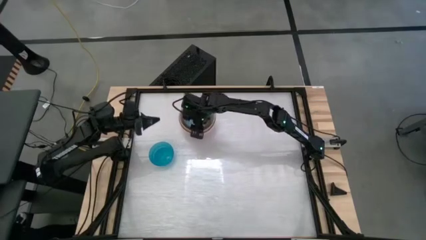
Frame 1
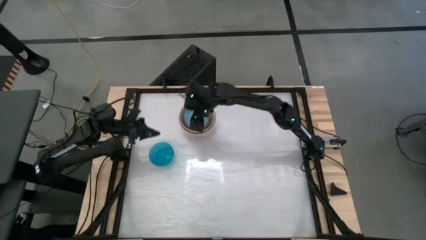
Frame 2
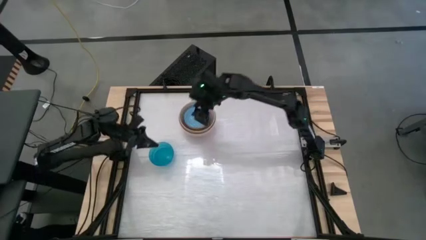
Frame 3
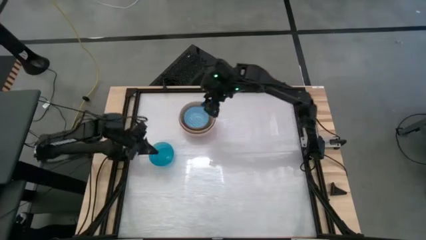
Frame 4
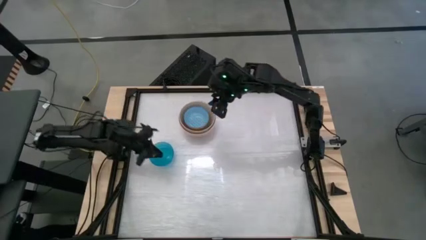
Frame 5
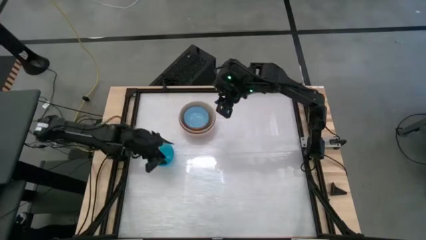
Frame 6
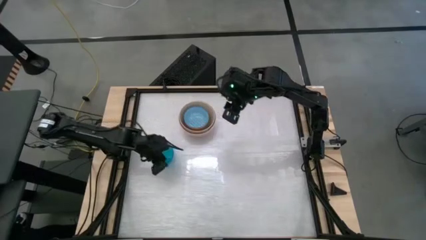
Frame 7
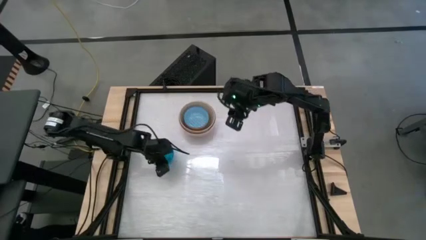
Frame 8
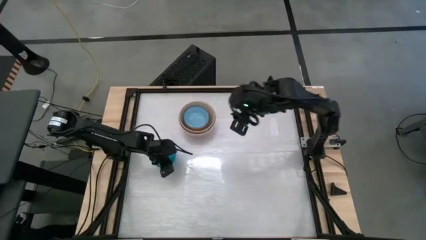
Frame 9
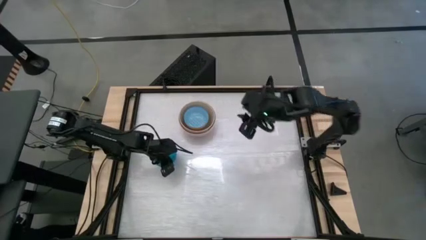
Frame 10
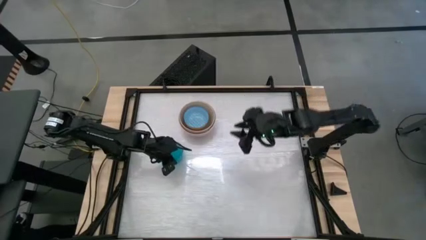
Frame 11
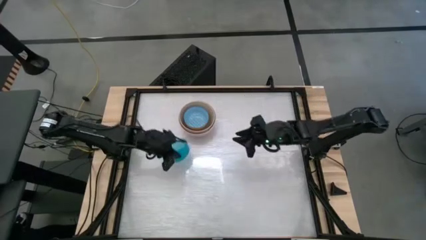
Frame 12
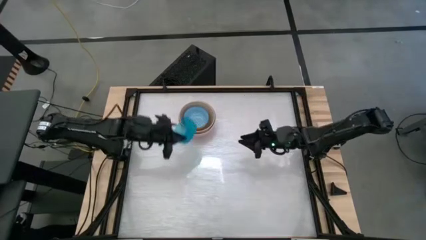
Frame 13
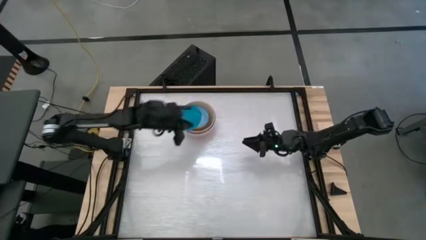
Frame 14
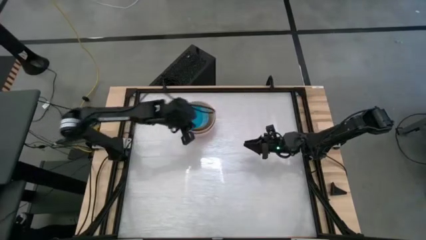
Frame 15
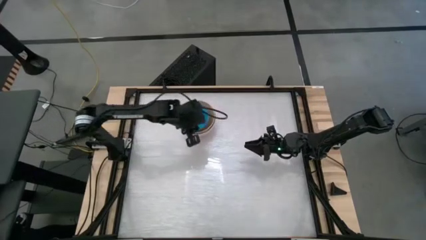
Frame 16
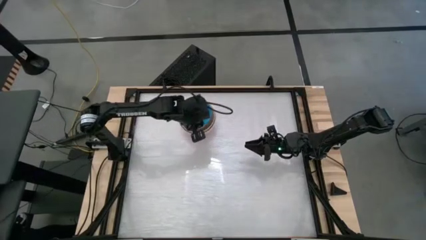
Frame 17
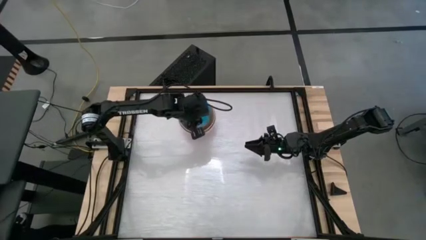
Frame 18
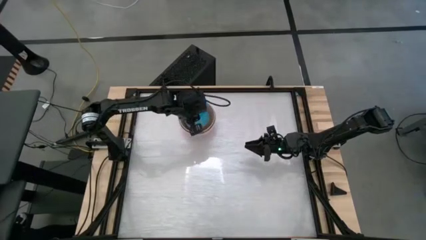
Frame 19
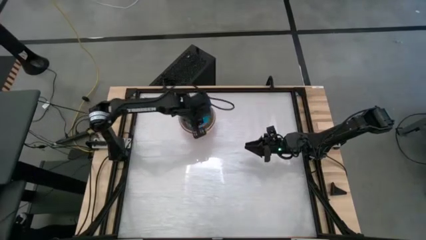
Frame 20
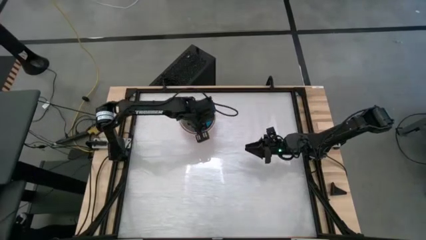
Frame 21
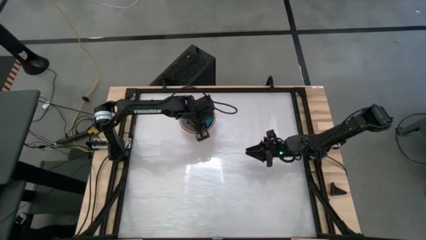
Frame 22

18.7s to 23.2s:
Stack the blue bowl on the orange bowl

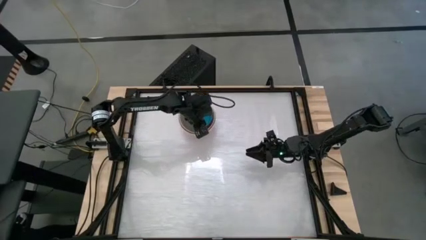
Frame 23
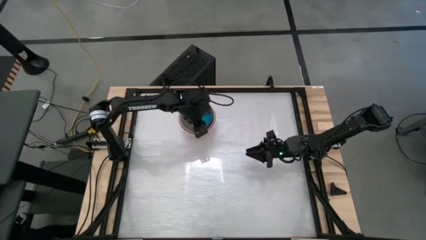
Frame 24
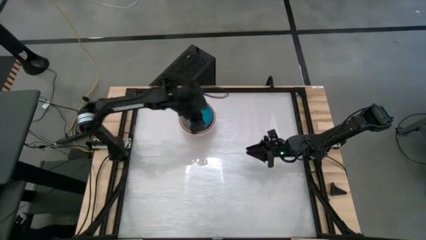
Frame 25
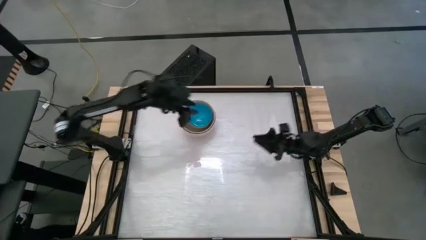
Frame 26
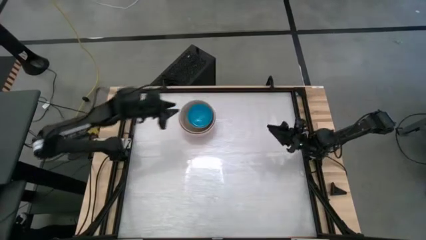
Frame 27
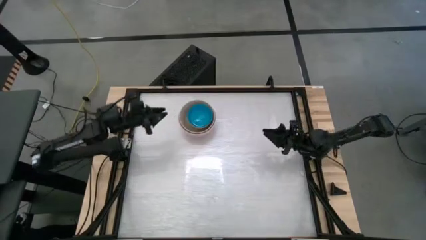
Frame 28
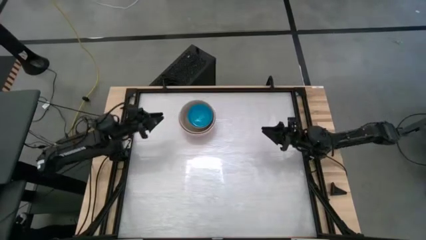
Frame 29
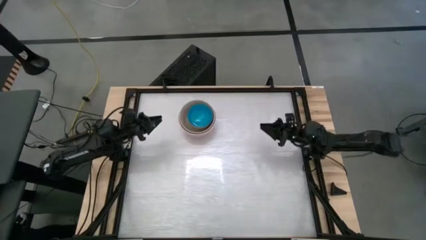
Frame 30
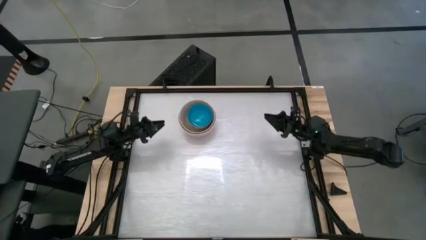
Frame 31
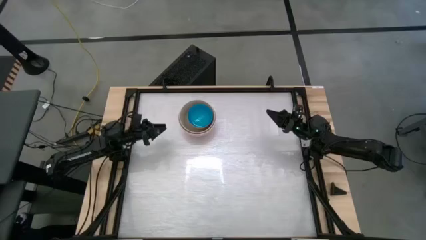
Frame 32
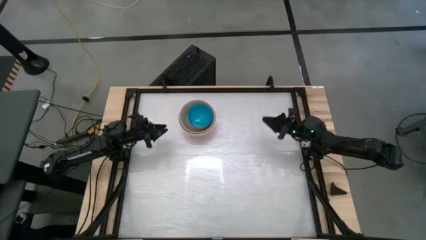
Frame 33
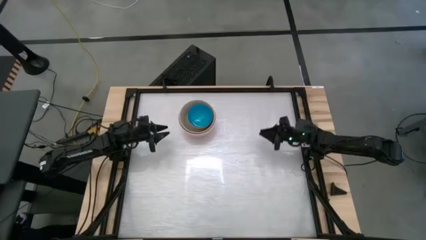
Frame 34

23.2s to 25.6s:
Return to Home Position

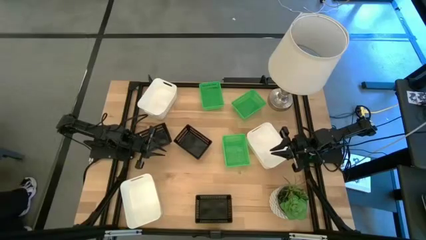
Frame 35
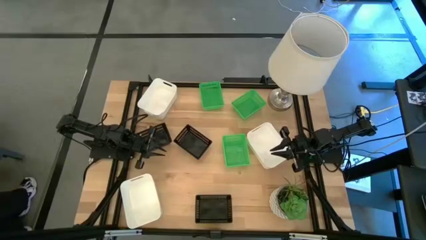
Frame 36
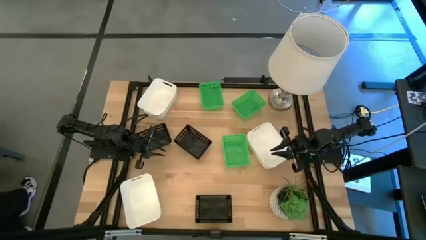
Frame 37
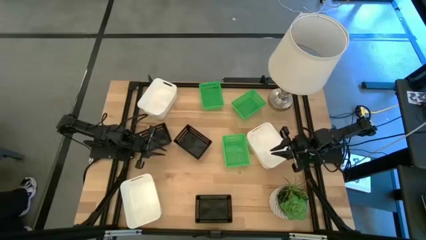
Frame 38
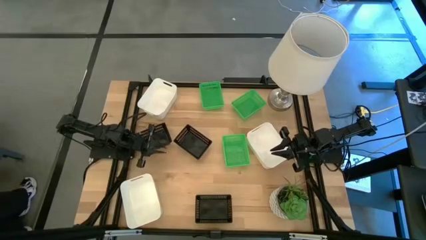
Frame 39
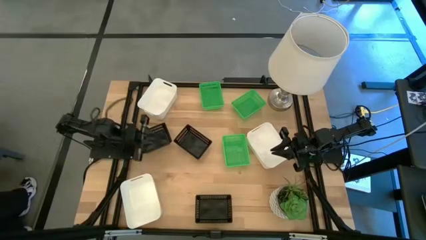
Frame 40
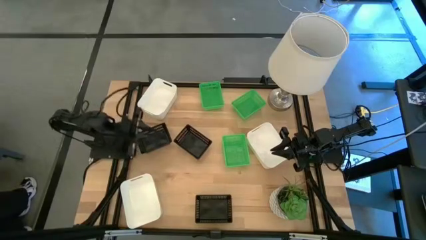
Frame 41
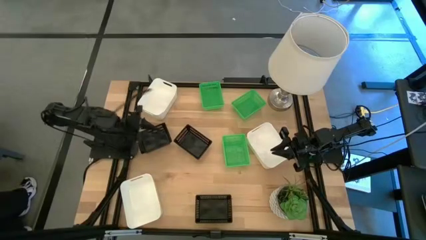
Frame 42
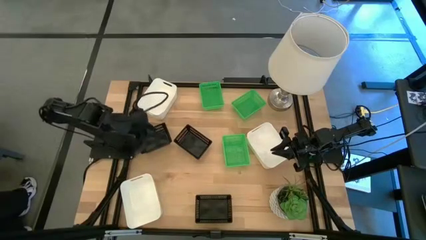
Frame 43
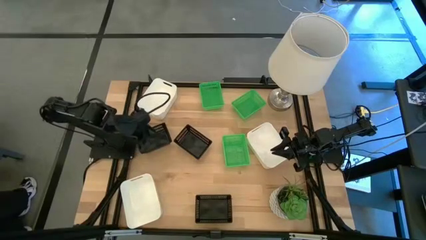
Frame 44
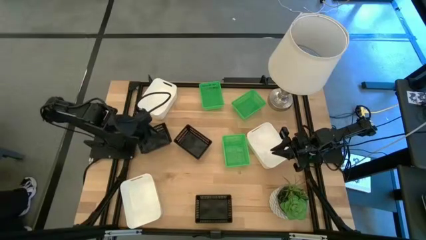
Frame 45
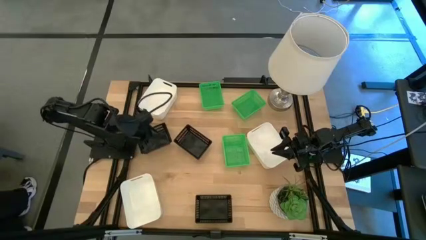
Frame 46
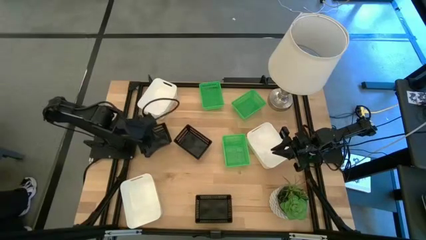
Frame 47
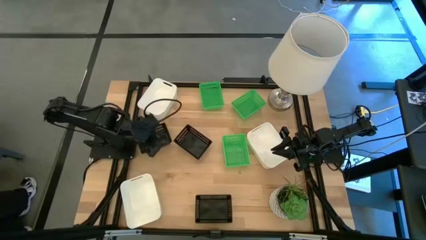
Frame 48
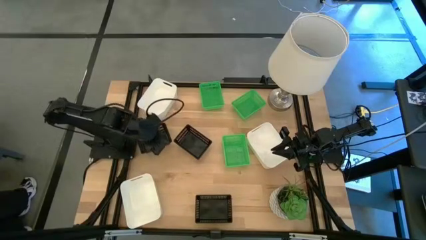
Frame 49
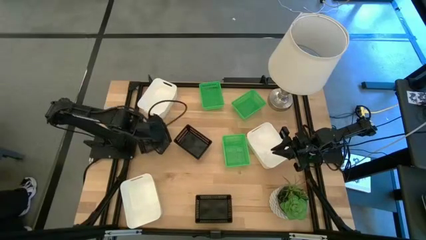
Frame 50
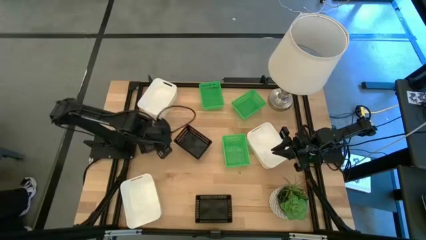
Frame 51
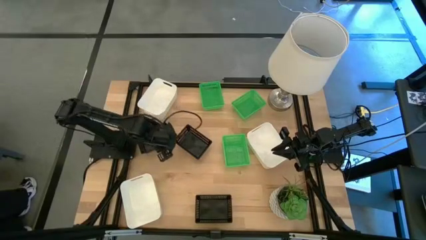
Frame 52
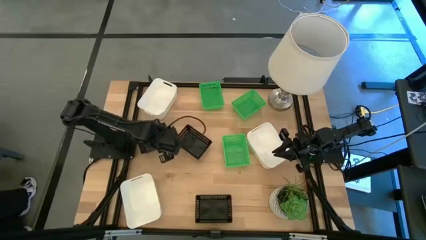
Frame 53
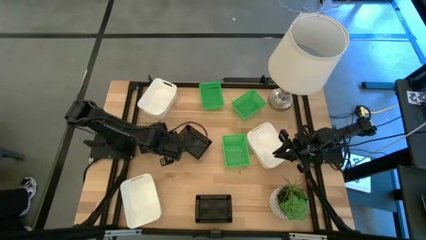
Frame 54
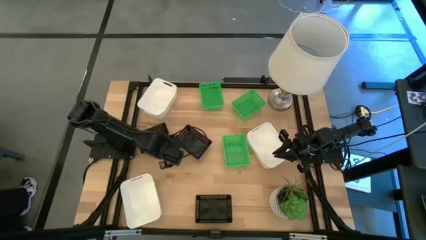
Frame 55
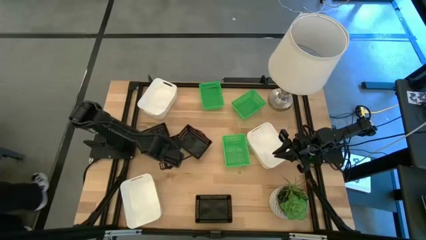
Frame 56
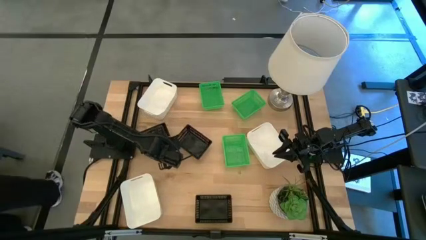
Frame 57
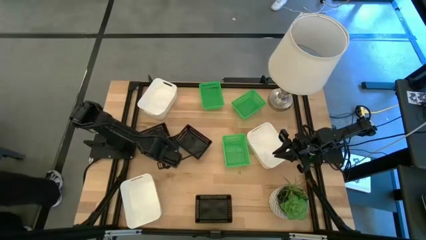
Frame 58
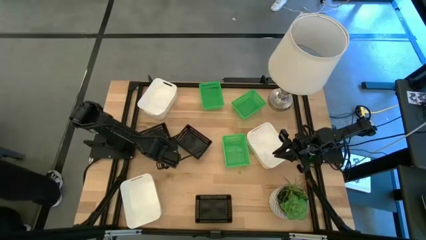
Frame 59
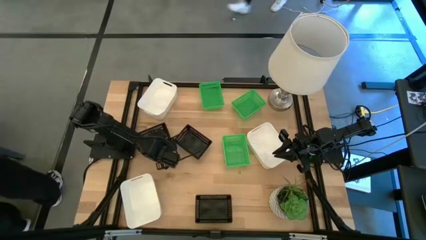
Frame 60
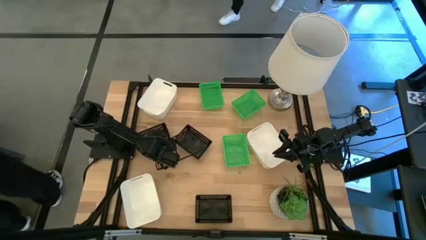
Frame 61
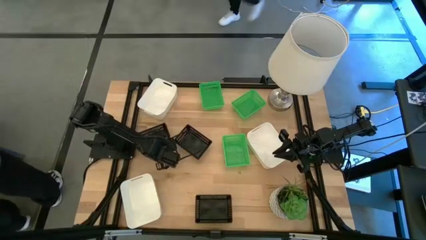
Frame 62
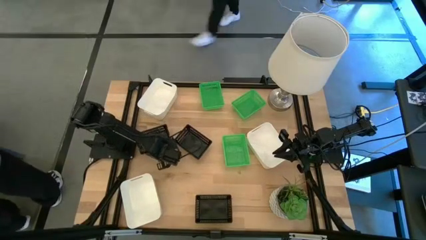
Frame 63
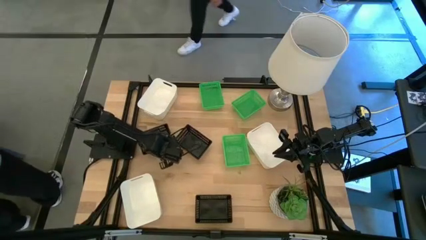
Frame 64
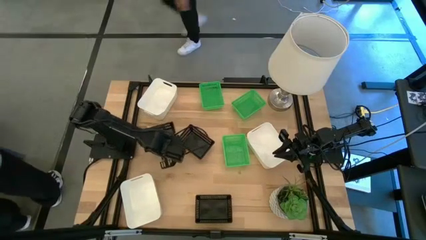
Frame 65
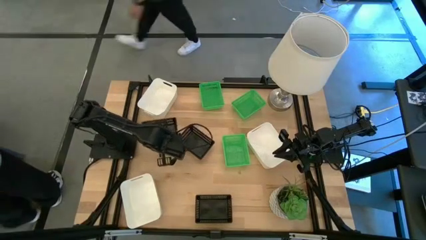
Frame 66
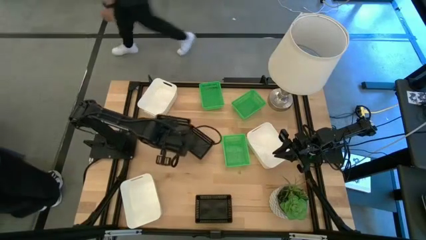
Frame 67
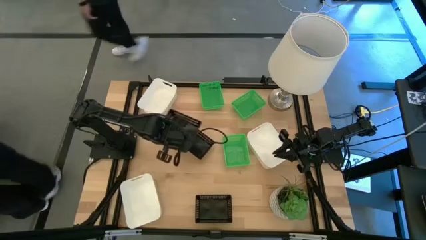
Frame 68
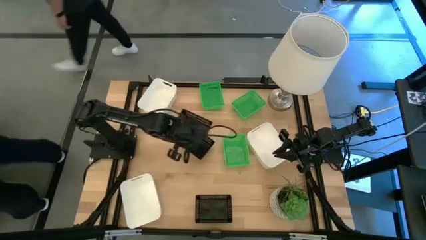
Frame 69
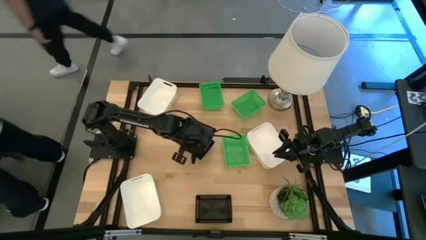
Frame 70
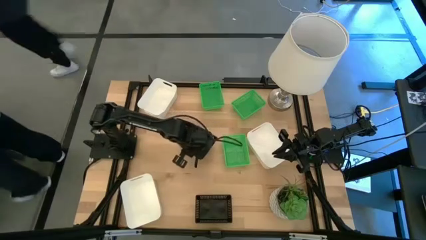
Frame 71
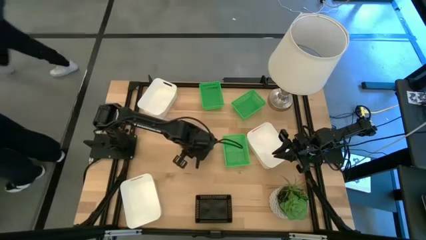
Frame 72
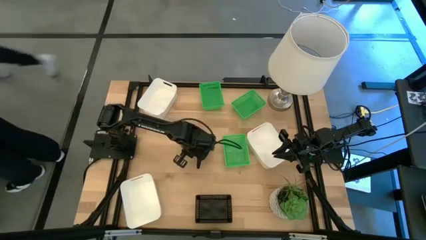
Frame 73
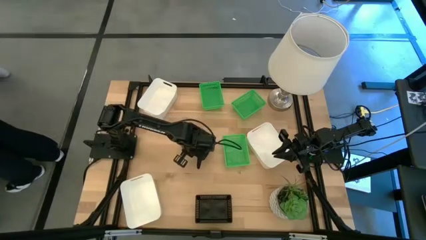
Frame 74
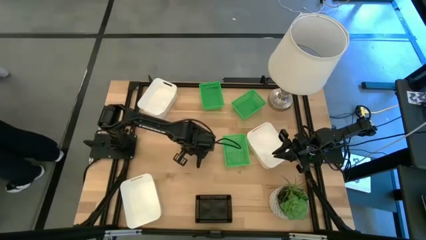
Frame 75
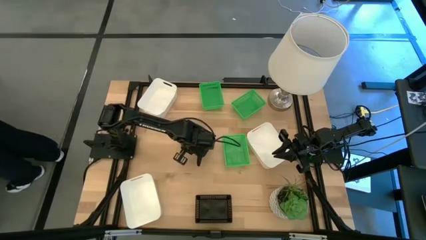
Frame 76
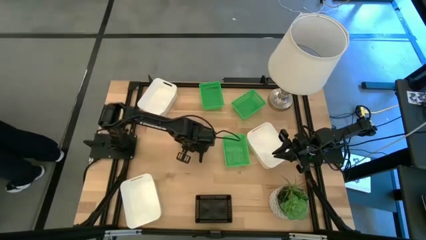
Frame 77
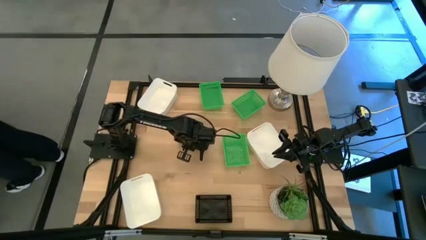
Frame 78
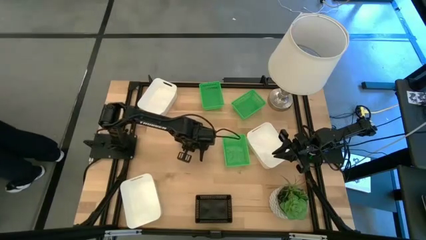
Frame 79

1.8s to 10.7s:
Stack the top left black bin on the top right black bin
